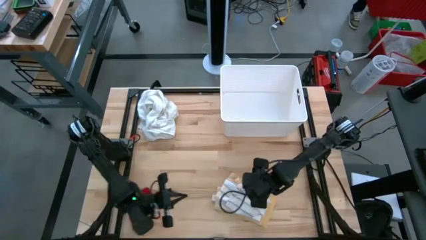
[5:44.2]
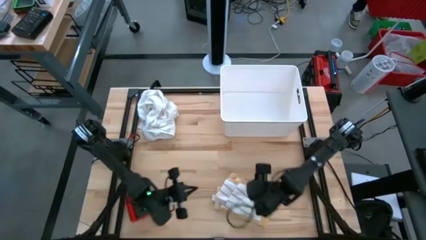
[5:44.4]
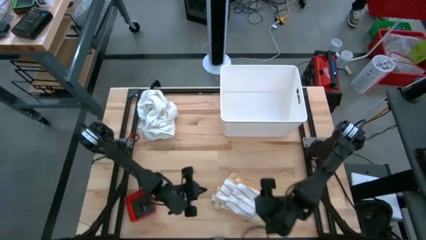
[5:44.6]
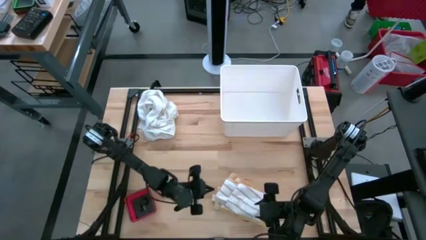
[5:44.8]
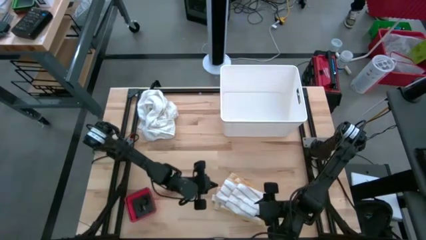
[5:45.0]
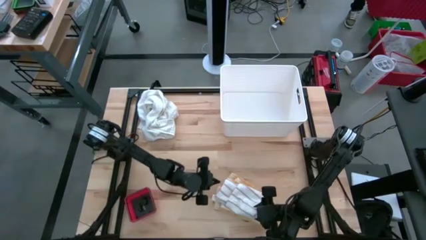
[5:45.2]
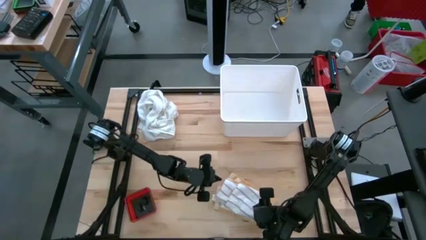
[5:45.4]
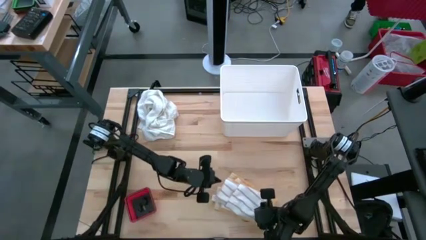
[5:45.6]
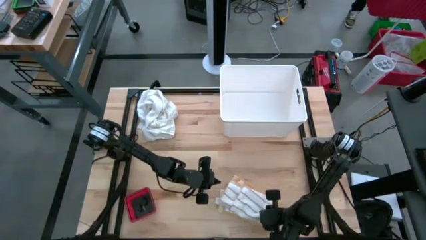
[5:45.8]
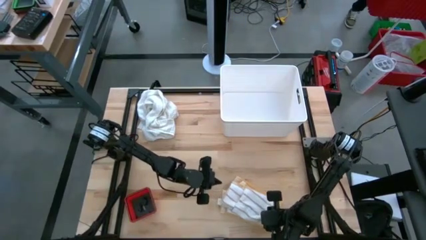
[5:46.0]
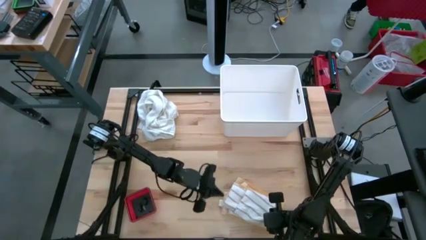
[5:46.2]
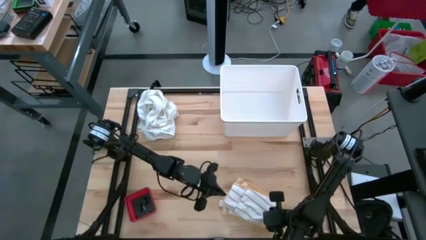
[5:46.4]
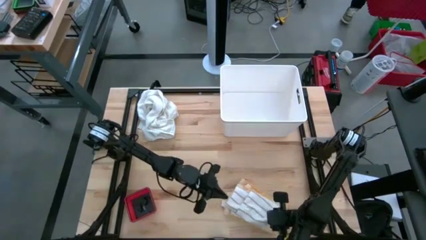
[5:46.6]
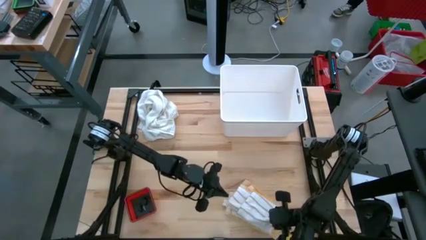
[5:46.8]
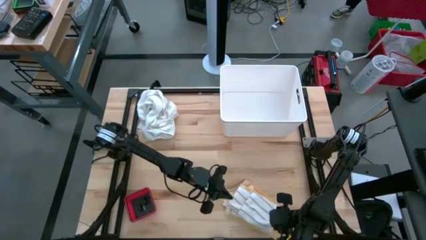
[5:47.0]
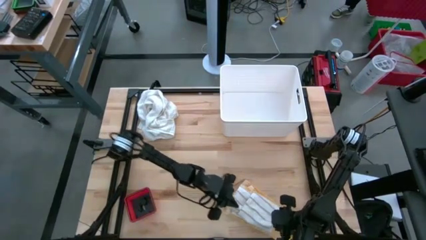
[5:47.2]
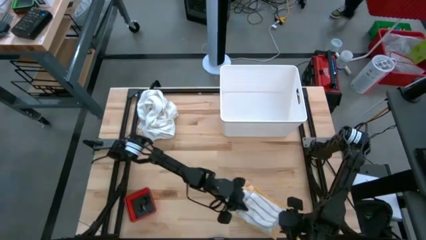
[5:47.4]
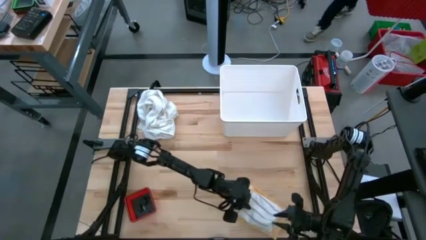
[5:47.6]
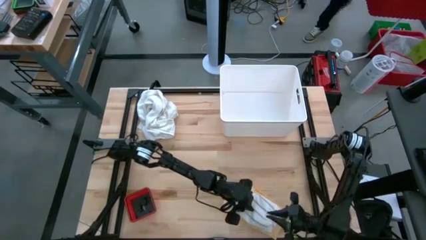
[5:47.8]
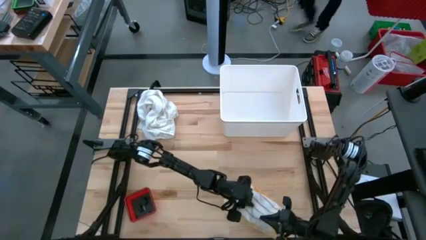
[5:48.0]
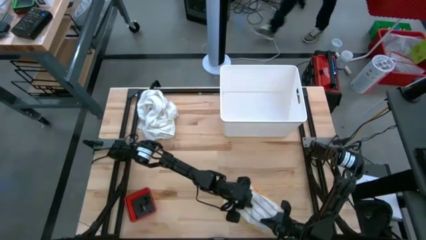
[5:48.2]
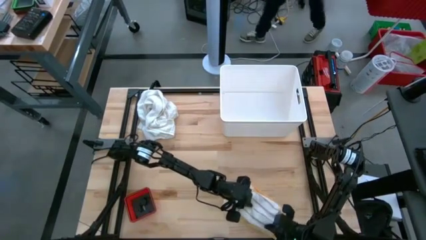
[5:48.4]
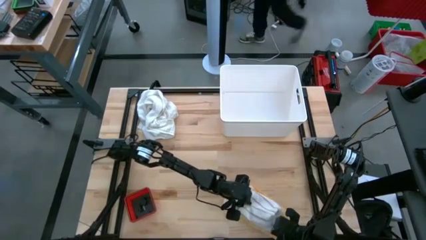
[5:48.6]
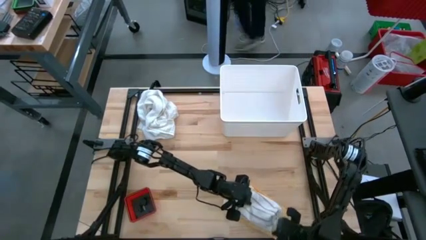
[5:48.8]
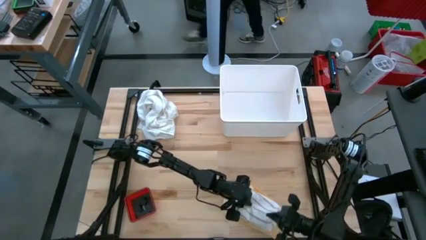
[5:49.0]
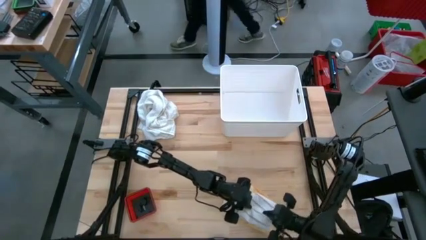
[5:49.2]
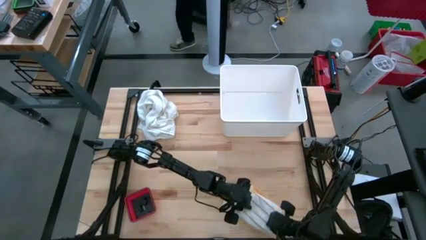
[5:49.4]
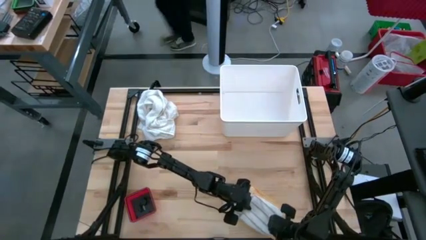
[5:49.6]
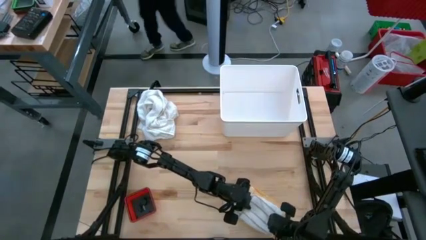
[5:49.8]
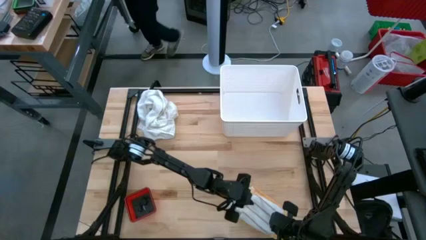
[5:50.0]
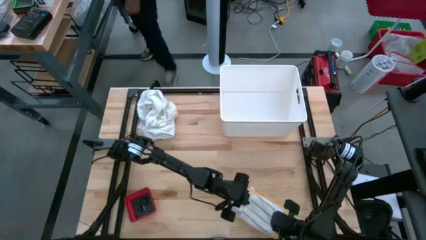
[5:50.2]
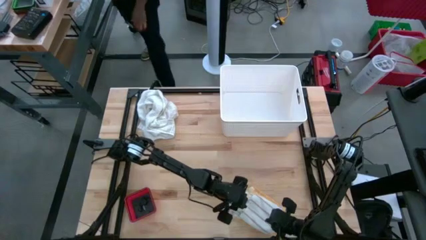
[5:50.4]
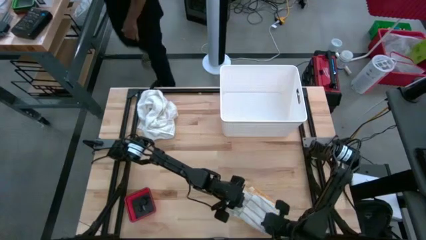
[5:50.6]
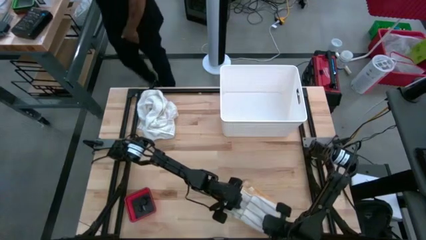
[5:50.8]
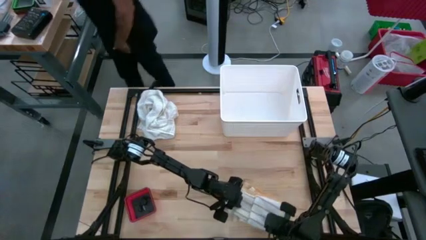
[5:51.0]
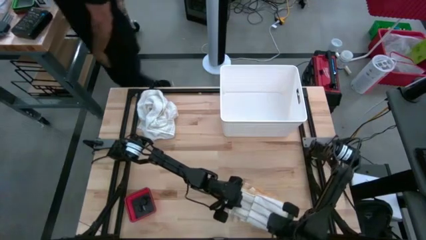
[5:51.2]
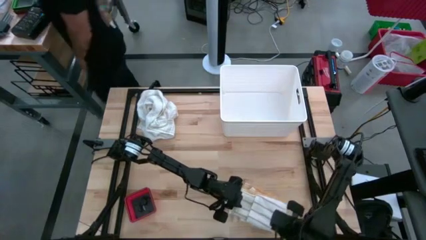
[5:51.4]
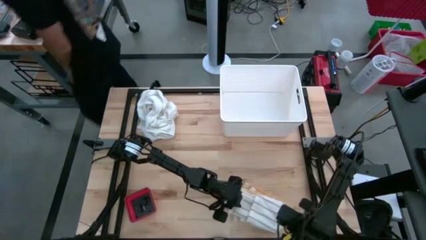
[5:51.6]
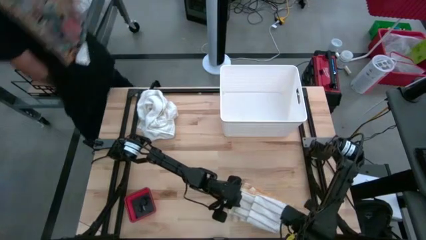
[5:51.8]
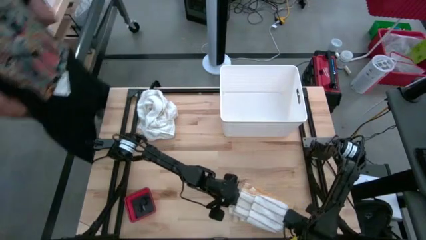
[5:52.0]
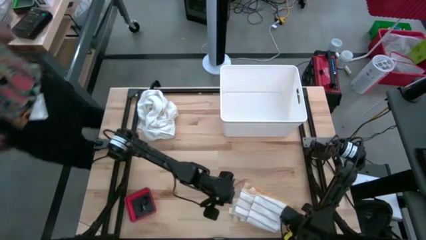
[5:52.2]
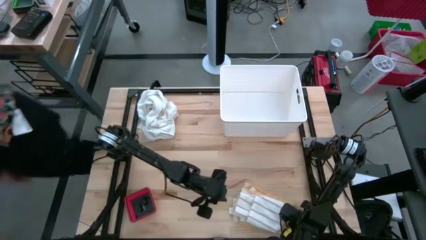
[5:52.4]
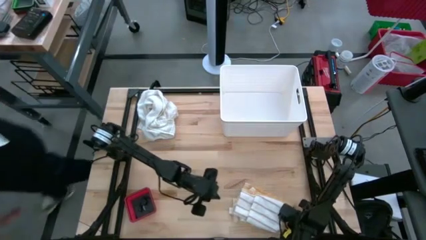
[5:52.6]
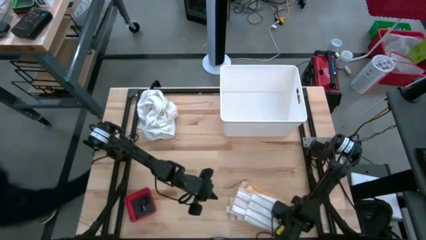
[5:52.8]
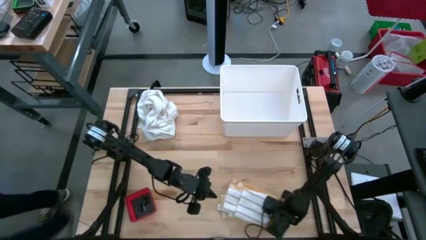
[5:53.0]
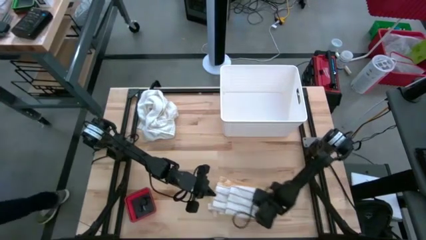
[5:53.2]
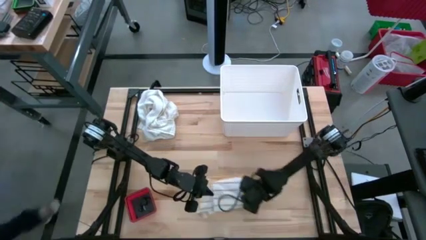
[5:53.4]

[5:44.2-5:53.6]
Task: Fold towel
Adjust the stack of folded kitchen towels

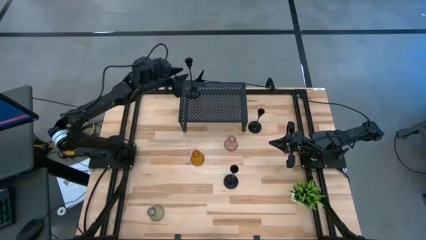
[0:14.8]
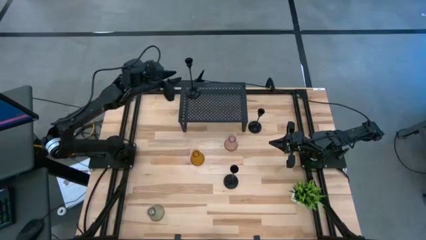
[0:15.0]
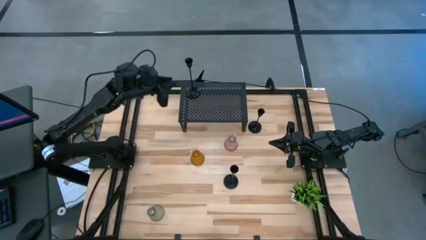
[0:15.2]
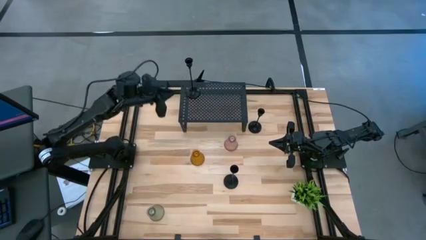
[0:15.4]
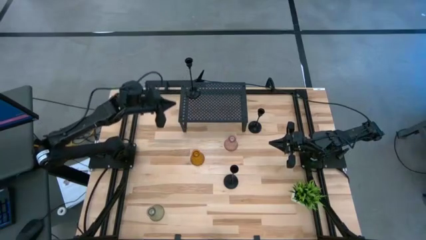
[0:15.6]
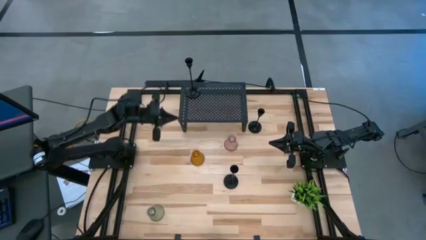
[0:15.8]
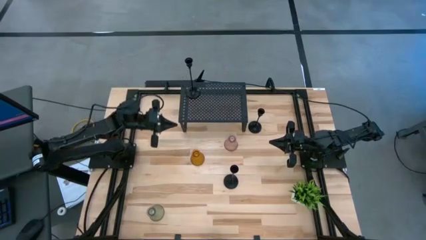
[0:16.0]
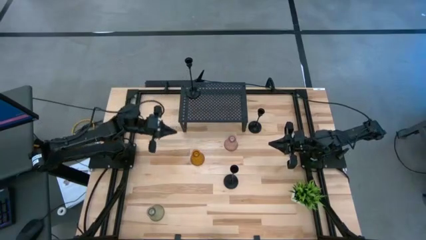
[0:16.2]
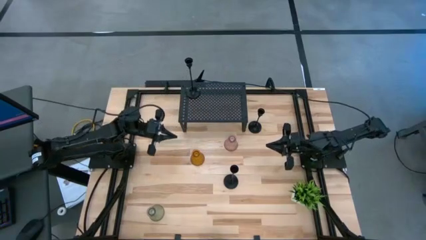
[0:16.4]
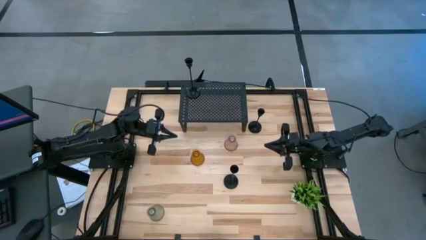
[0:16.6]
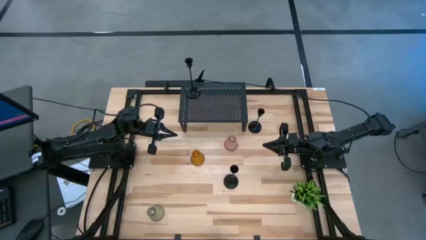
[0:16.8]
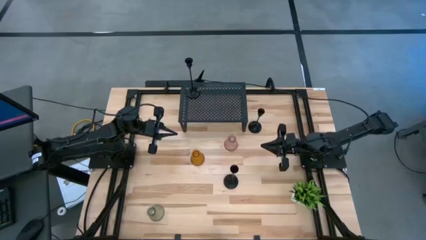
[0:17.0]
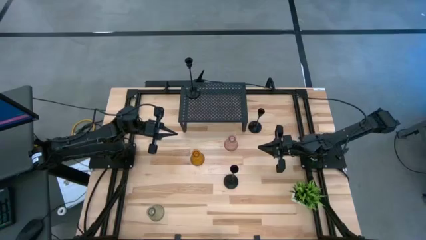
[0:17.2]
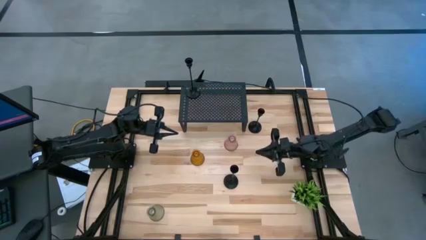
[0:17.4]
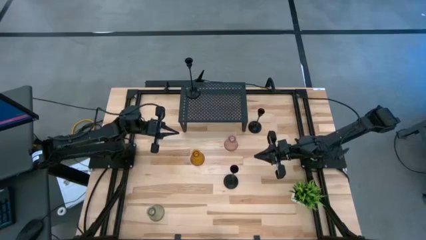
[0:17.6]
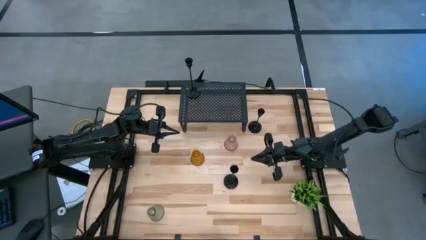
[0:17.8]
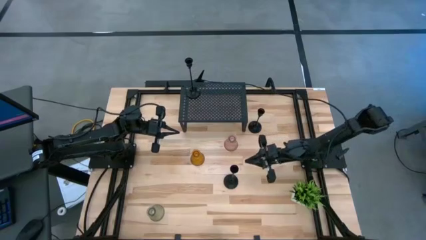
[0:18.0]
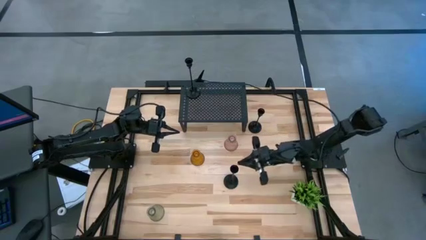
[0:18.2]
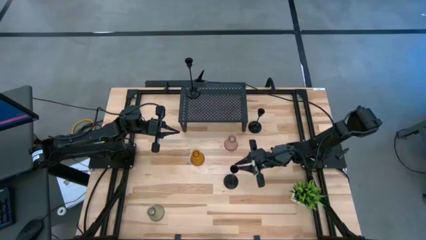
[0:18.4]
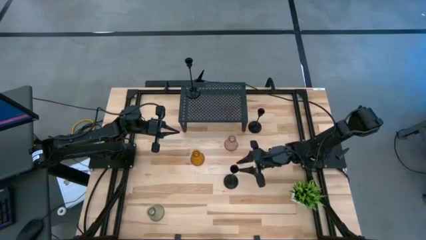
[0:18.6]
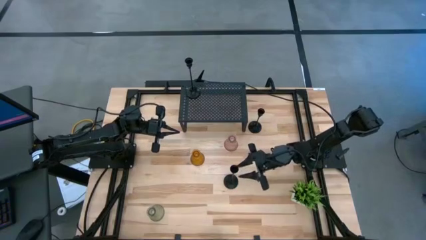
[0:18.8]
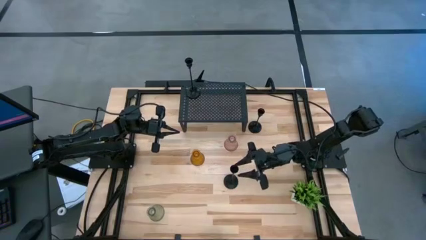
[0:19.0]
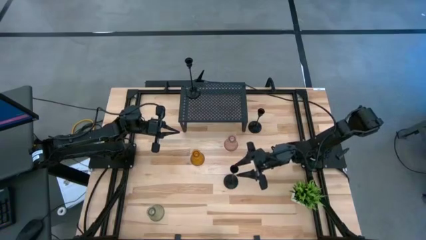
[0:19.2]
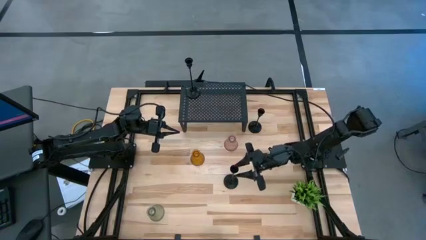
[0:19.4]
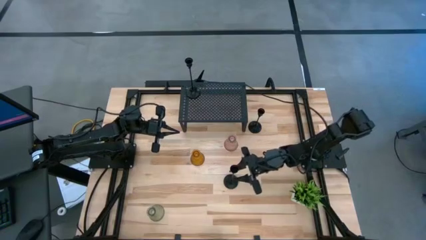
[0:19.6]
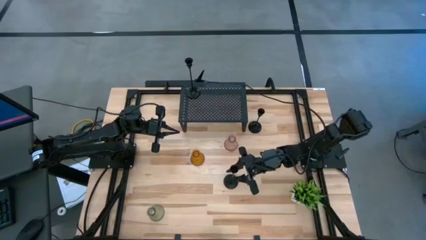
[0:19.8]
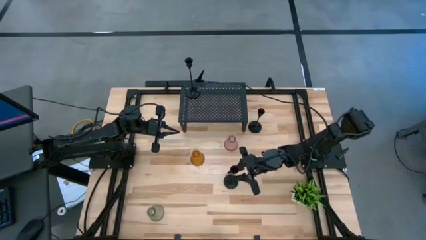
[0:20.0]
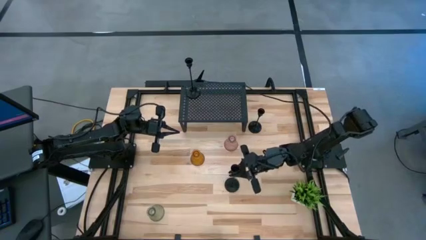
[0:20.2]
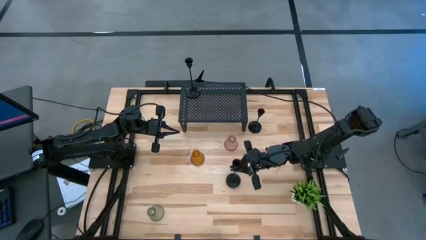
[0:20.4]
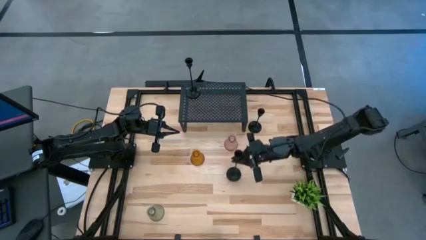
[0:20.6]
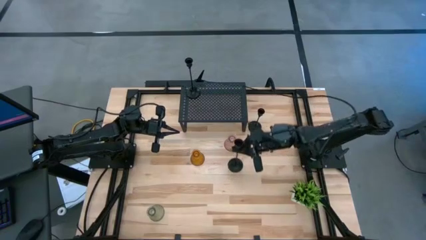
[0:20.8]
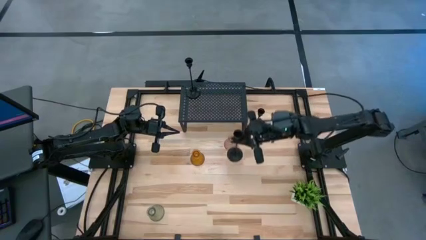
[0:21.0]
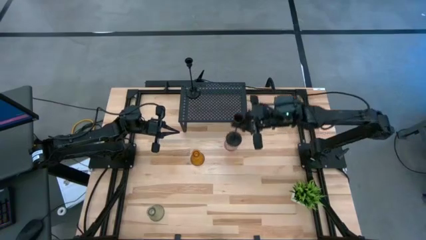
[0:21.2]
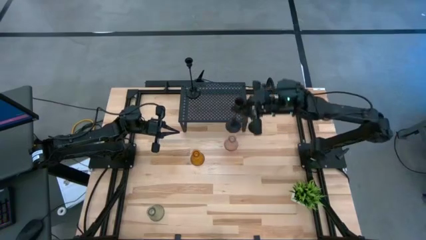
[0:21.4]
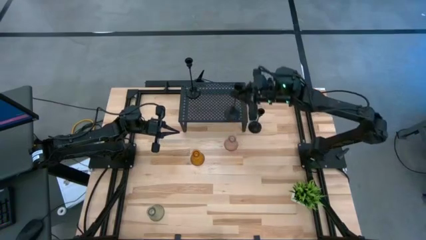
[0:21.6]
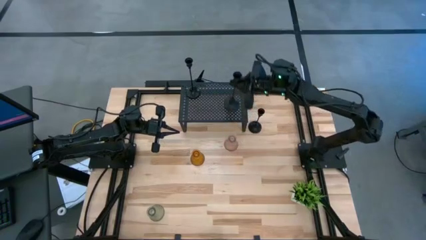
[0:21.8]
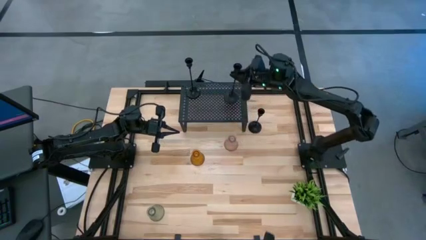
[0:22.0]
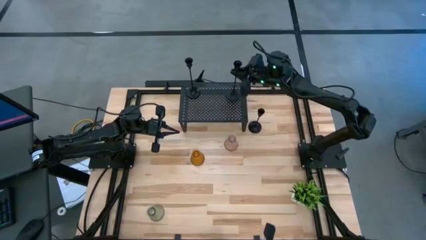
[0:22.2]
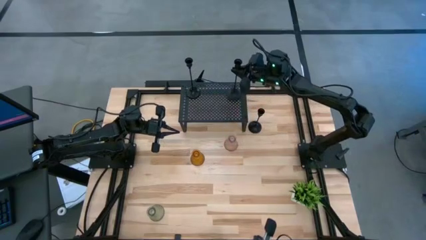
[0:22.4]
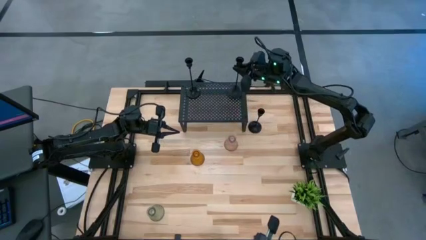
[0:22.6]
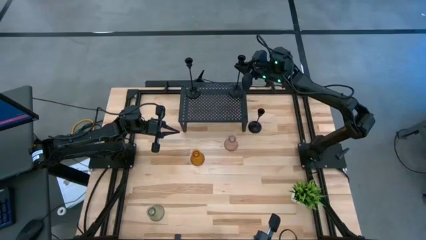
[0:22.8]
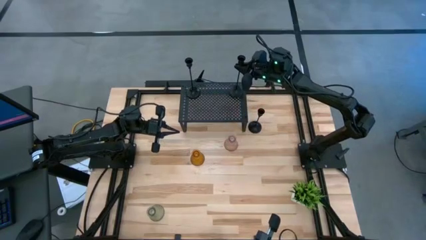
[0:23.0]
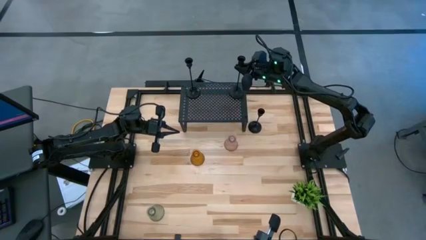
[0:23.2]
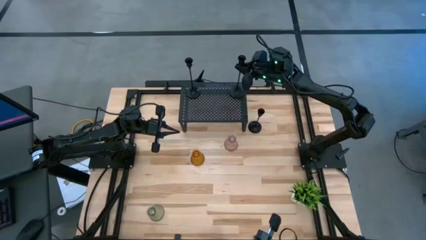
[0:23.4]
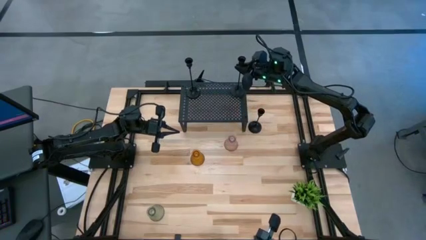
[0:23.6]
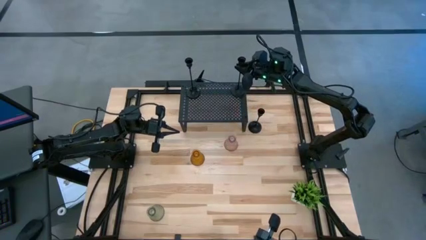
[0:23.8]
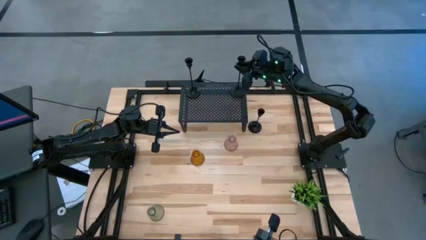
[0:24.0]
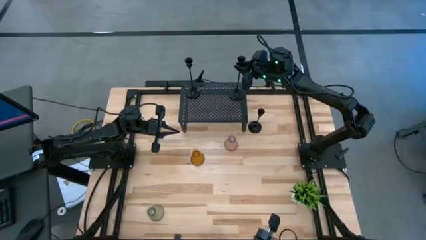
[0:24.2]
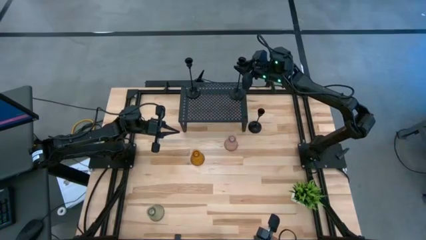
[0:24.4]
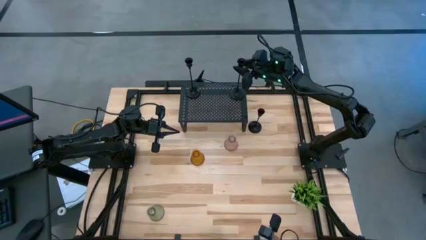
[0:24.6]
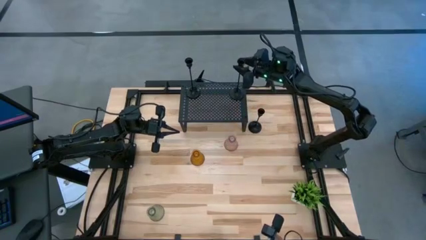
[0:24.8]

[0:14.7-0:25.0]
Task: Pick & Place candle stick holders
Put the bottom black candle holder on the shelf
